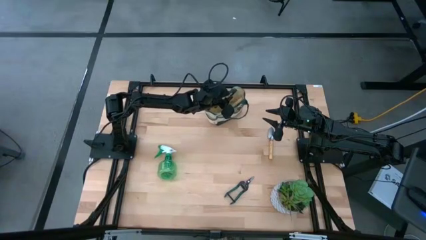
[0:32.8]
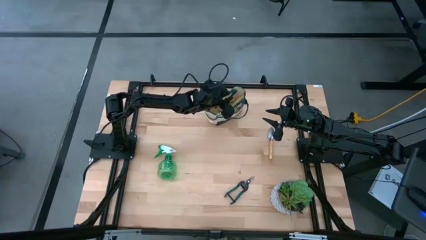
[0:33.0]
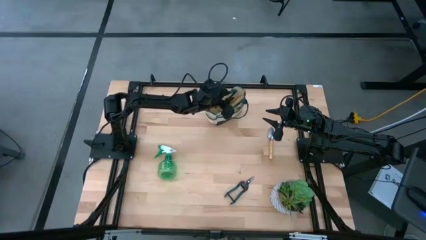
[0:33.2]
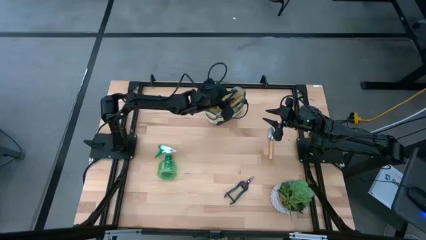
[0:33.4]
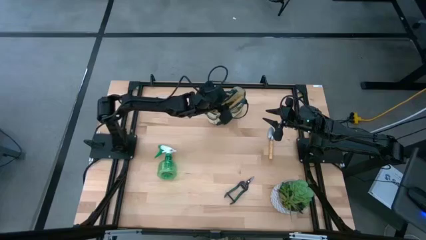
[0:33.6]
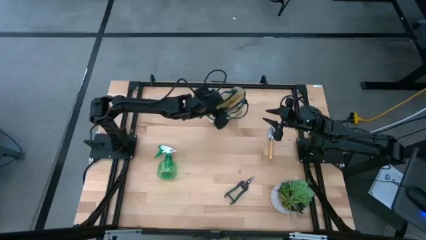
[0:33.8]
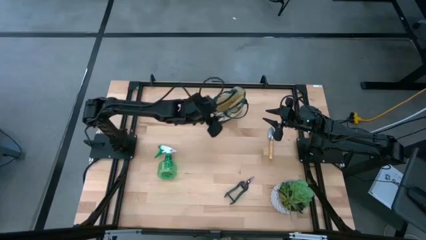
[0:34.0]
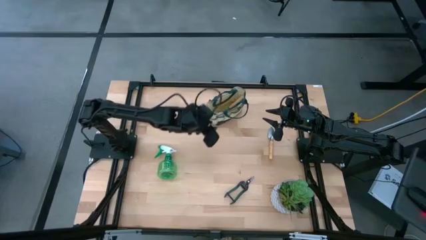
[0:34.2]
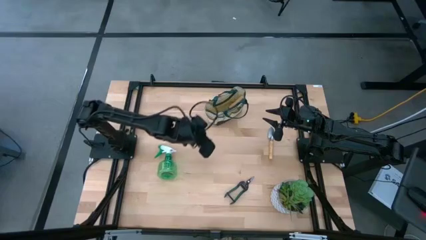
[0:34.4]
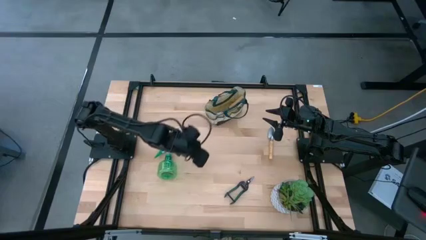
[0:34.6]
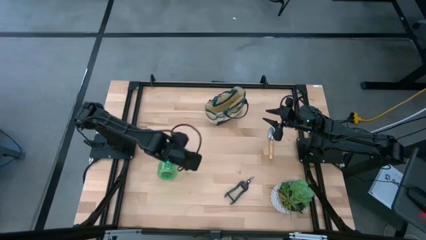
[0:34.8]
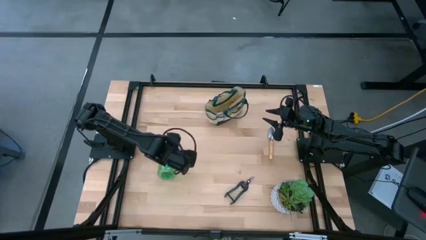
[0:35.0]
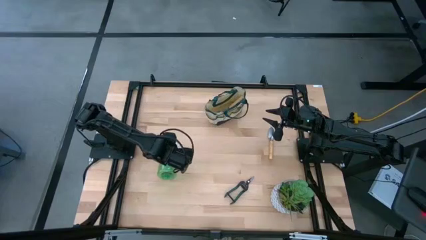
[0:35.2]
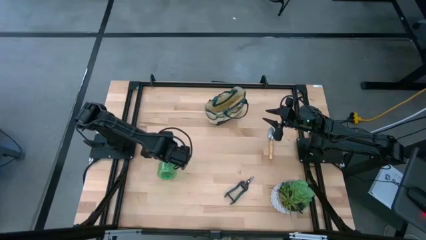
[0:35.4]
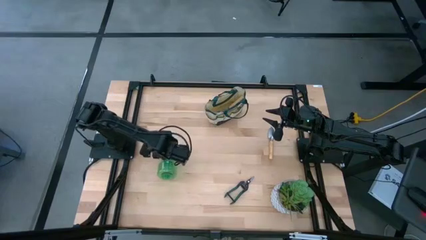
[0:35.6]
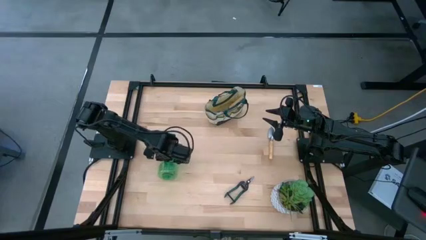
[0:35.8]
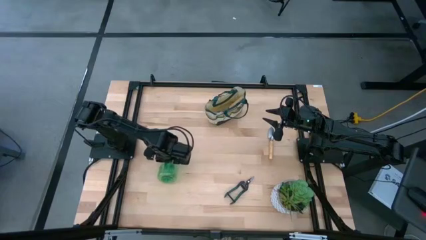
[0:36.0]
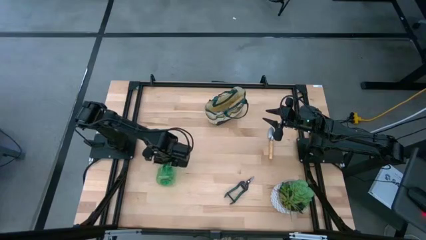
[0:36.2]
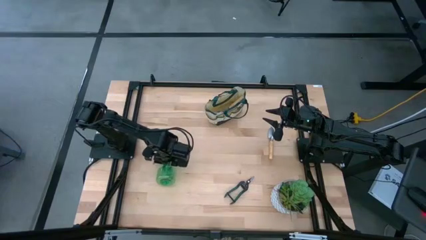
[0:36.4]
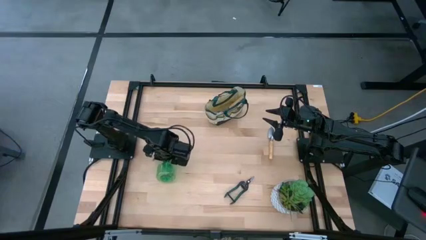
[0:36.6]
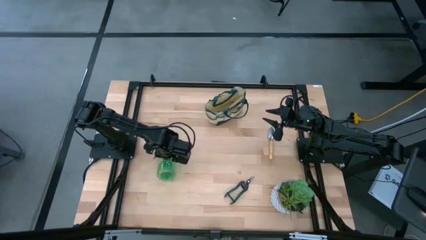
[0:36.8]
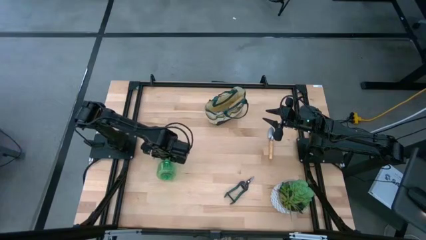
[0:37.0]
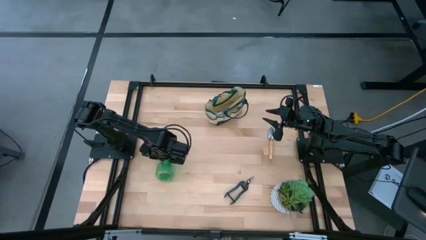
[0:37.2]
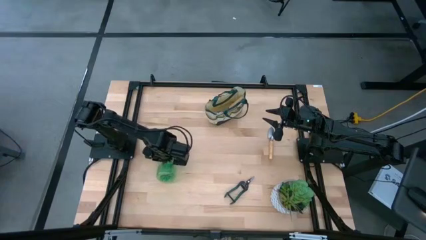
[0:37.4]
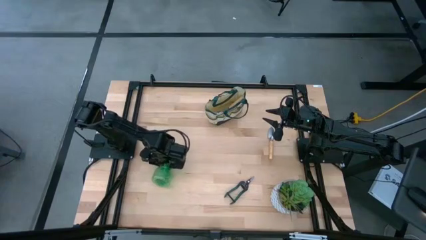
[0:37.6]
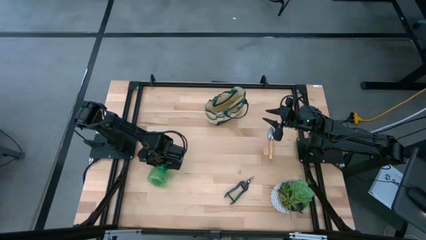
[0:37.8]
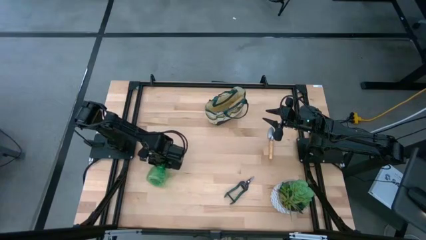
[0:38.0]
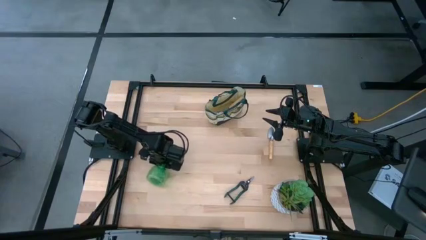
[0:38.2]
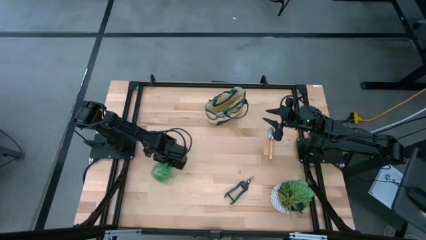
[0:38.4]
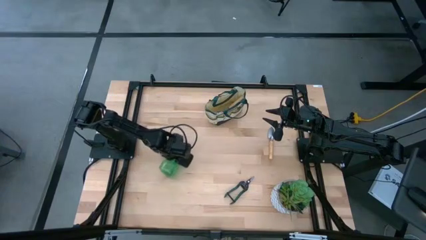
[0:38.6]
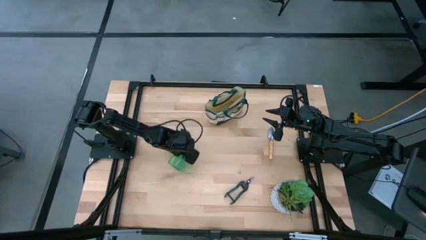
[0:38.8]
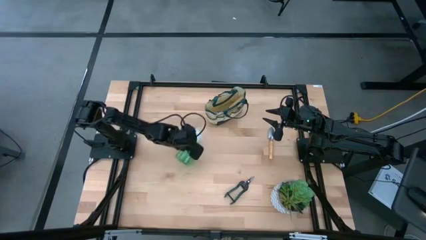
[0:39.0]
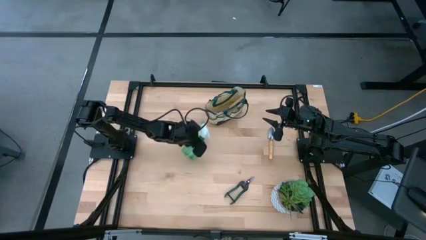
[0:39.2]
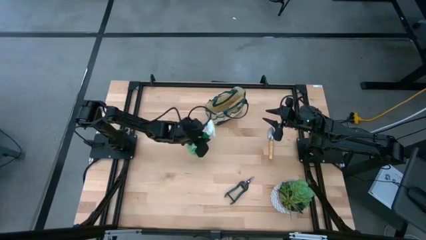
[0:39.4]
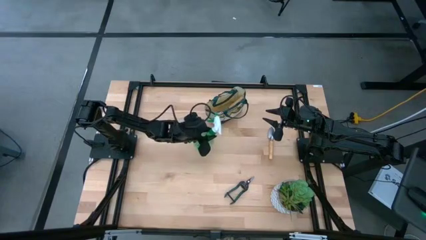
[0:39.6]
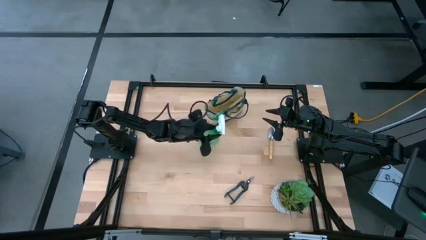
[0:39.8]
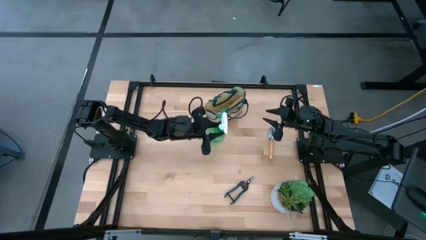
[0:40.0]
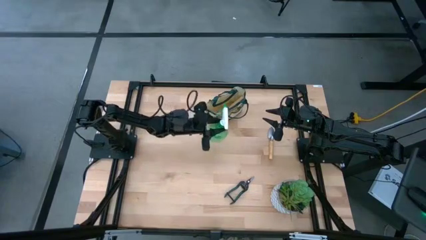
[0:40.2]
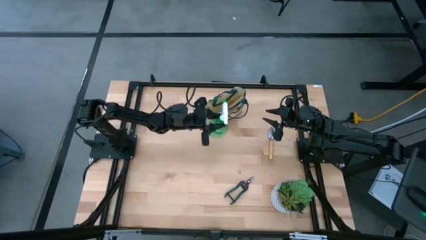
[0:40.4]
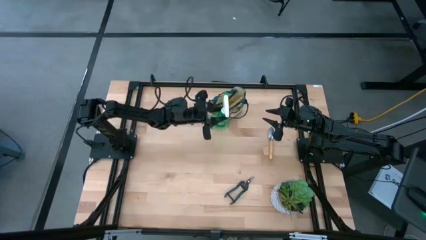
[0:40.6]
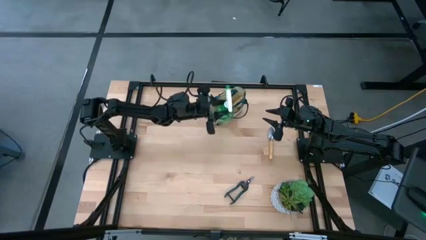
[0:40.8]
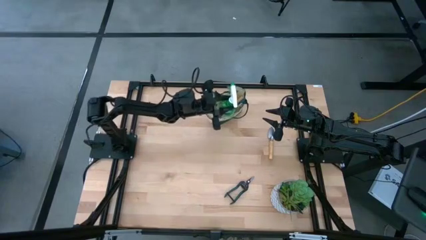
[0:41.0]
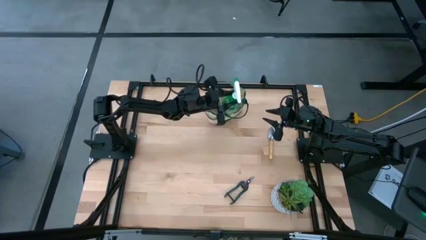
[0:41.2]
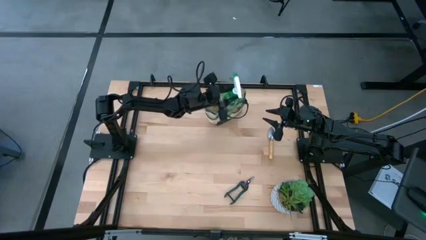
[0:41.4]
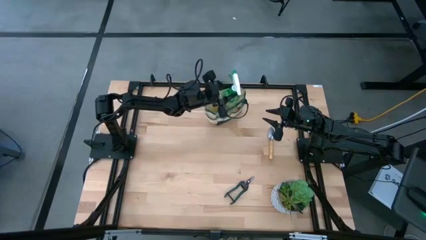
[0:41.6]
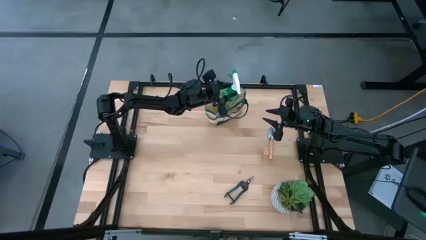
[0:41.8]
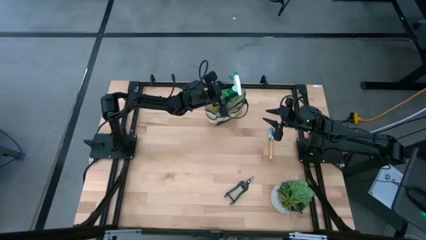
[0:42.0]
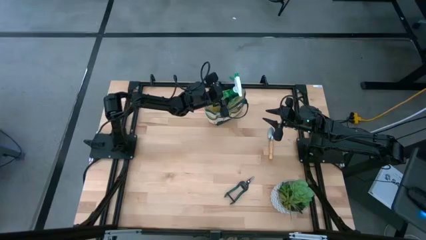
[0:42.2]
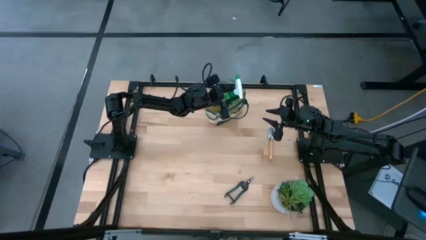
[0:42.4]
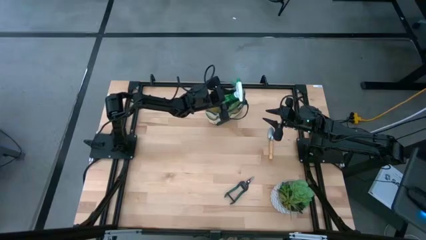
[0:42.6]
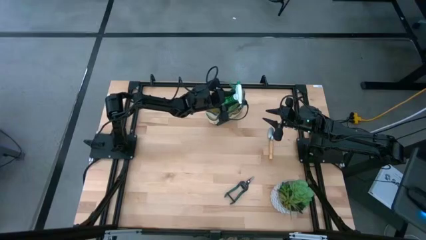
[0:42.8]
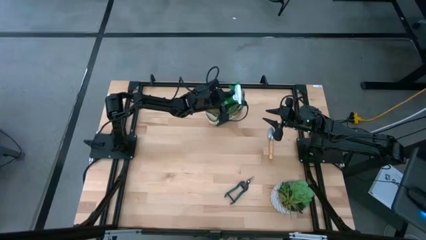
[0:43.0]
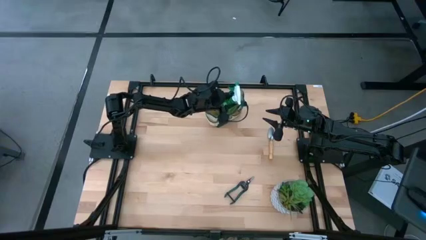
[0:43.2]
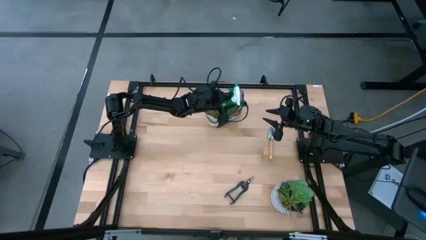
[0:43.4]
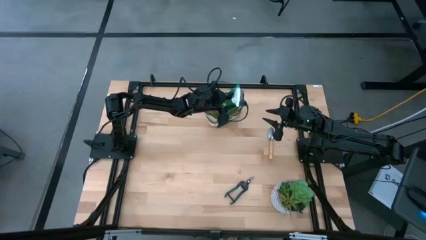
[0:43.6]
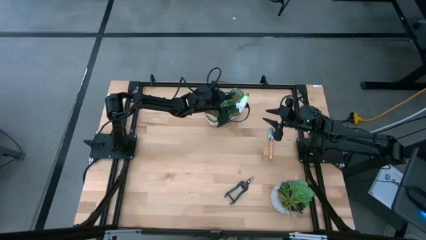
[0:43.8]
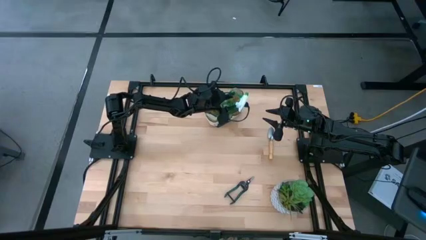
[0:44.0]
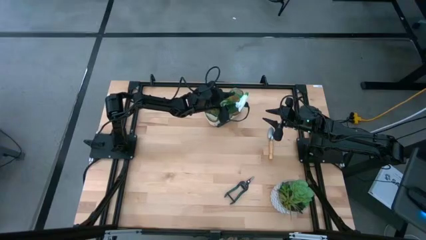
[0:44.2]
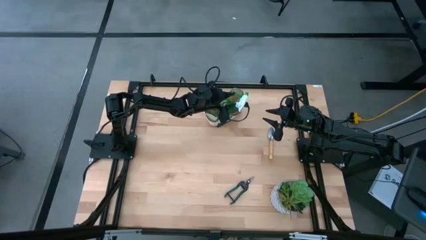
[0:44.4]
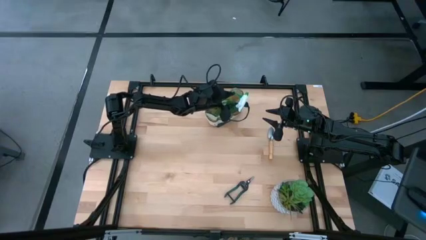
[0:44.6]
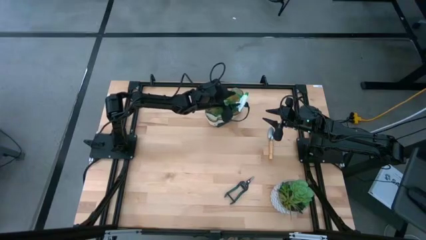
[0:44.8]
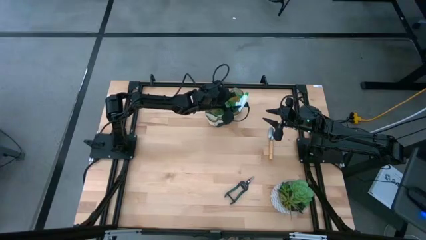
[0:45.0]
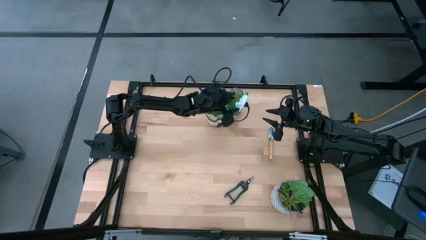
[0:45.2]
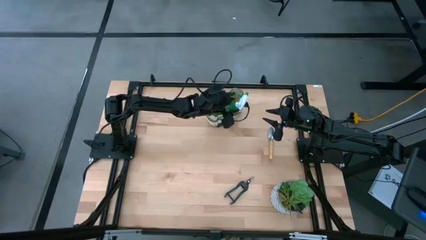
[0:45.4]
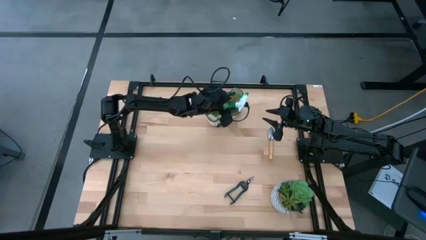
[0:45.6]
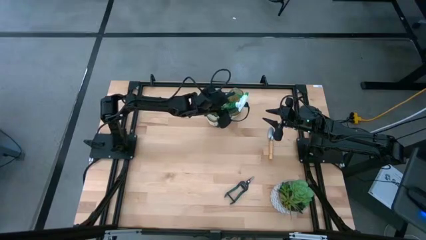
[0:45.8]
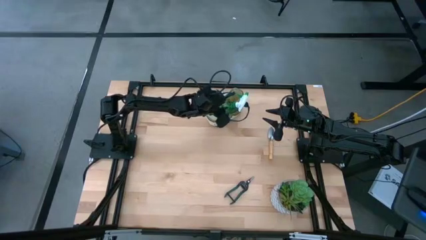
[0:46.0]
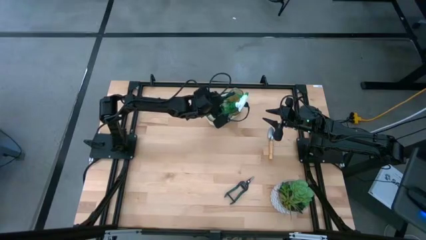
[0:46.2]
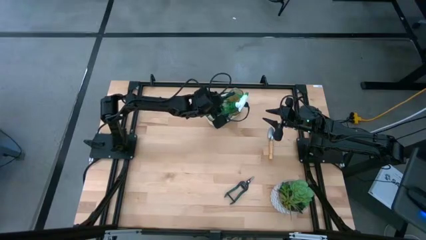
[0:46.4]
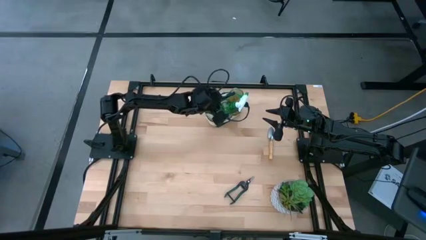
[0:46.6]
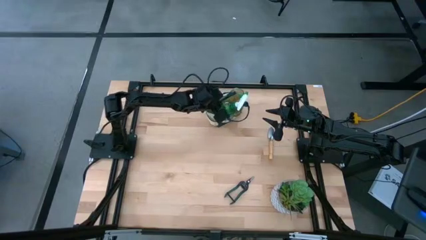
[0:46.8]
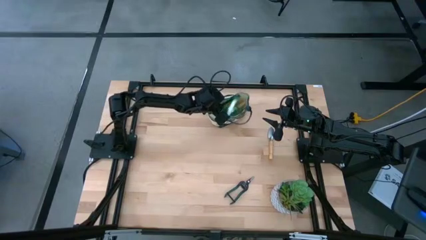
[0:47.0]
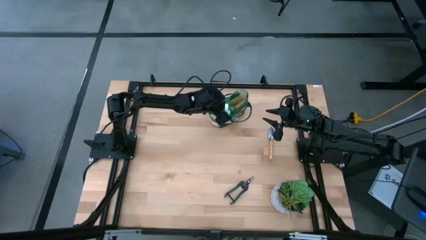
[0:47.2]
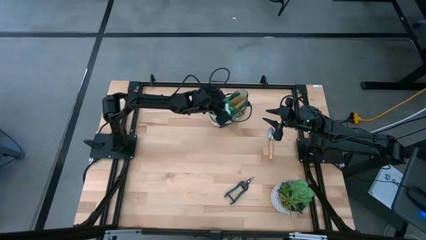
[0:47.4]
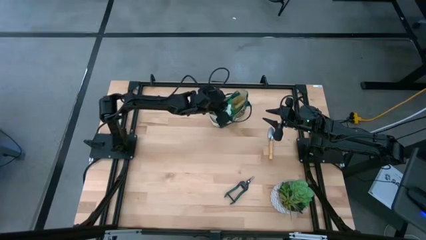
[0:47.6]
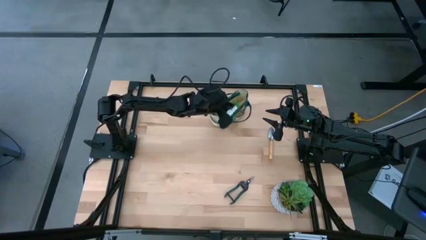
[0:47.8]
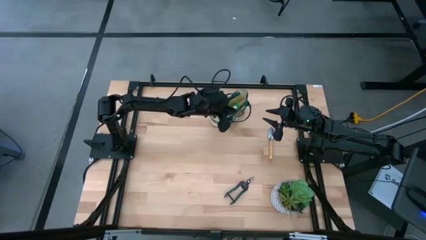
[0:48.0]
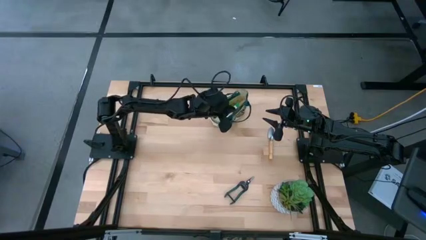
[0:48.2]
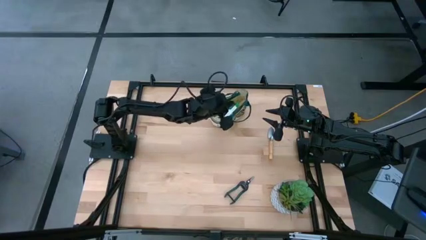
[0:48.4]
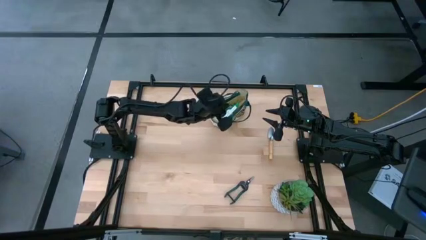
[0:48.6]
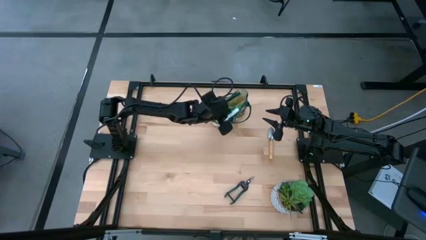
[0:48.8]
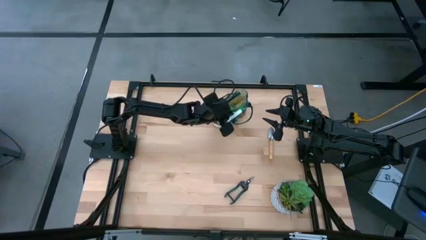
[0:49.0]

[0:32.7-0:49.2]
Task: Pick & Place Garden tools in Gardening bag
Put the green spray bottle into the green gardening bag
